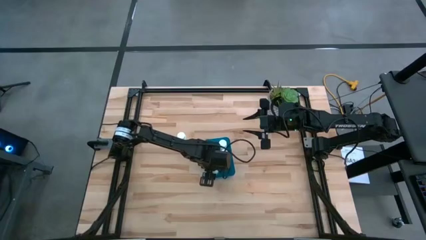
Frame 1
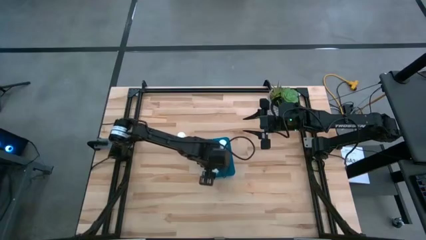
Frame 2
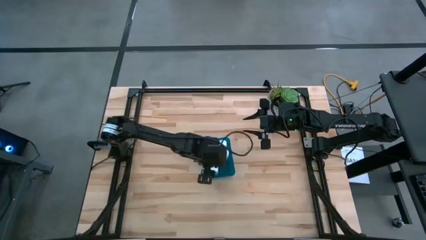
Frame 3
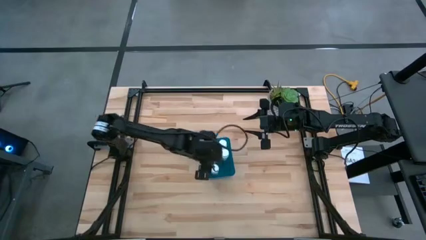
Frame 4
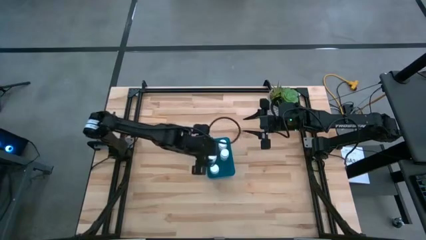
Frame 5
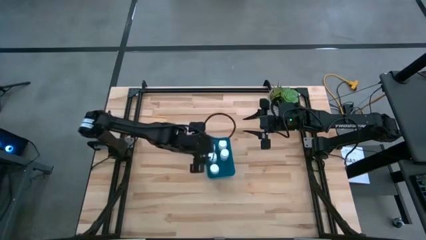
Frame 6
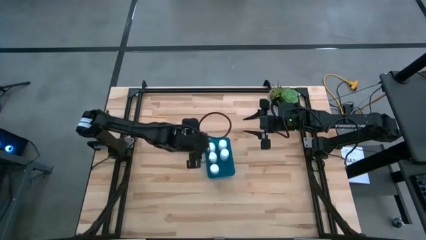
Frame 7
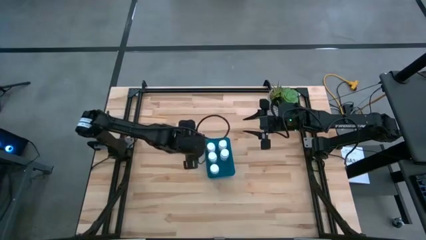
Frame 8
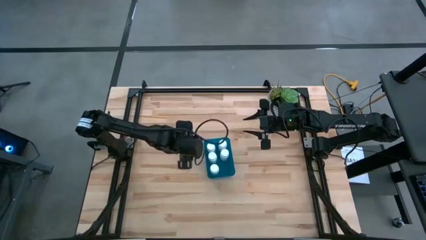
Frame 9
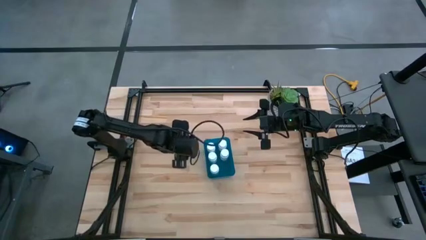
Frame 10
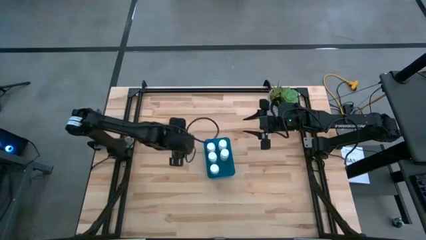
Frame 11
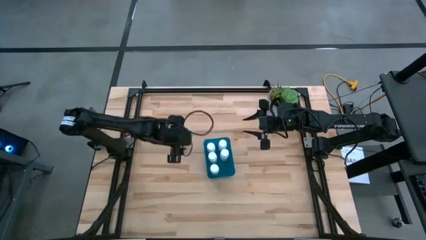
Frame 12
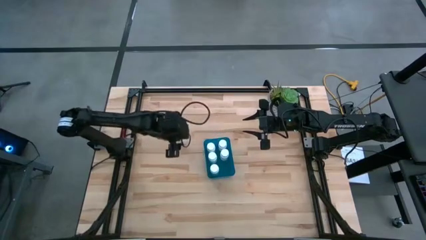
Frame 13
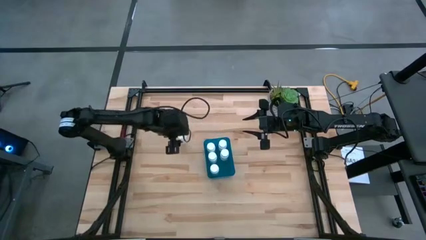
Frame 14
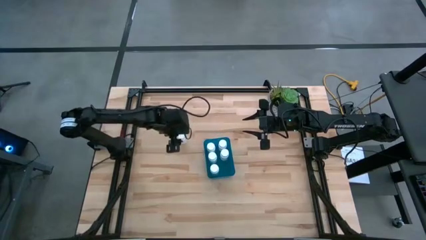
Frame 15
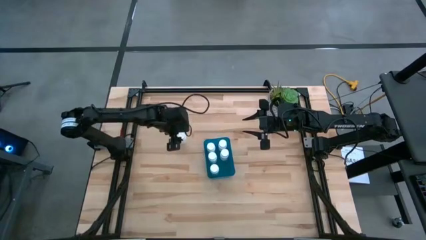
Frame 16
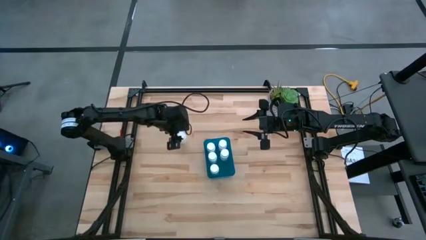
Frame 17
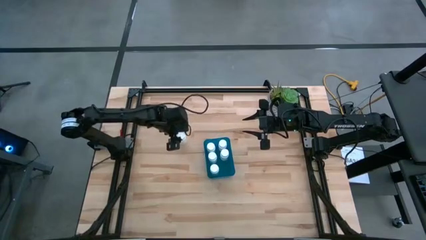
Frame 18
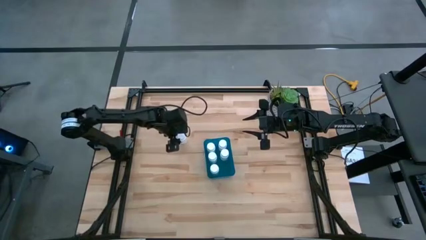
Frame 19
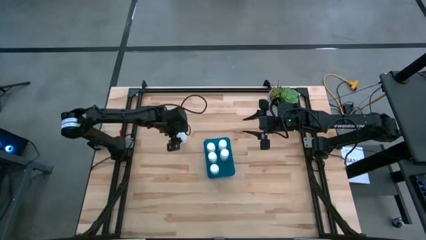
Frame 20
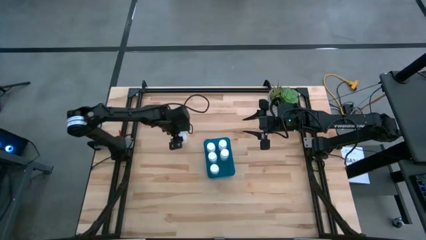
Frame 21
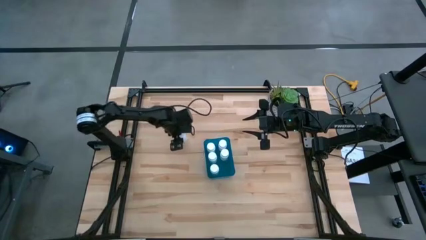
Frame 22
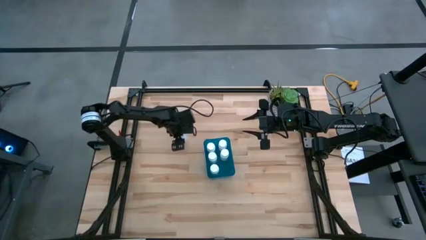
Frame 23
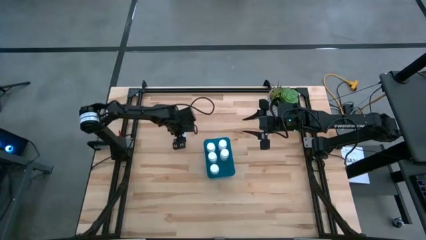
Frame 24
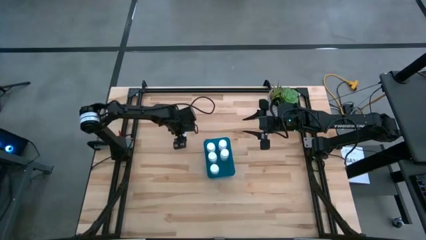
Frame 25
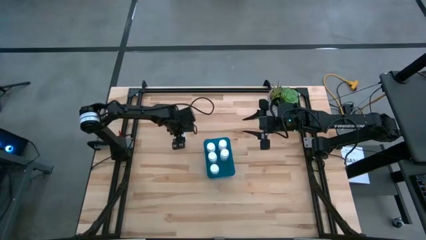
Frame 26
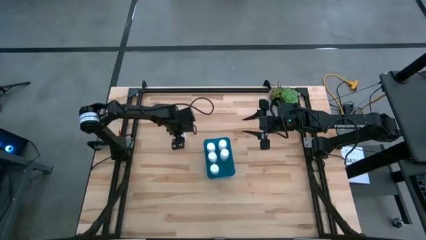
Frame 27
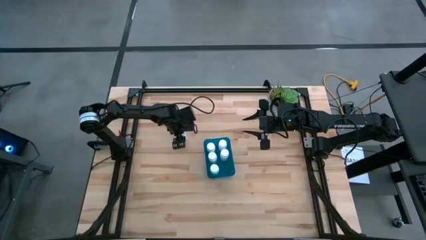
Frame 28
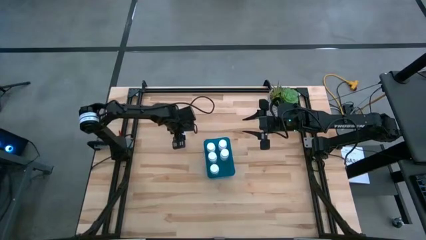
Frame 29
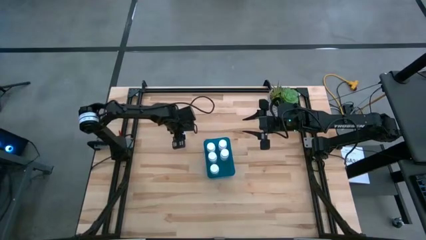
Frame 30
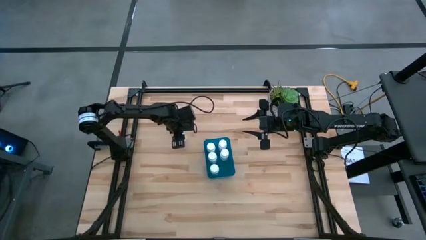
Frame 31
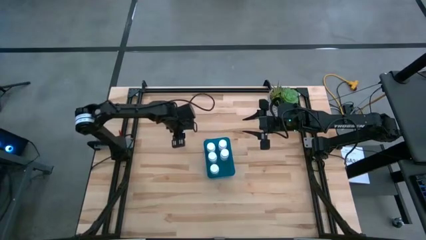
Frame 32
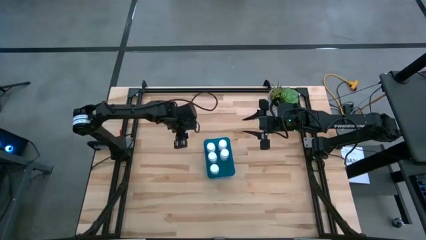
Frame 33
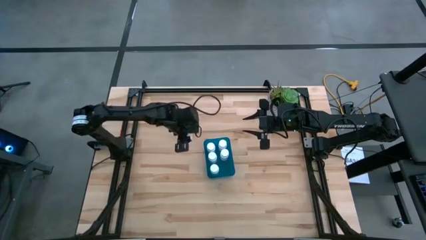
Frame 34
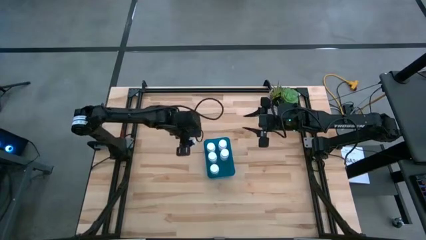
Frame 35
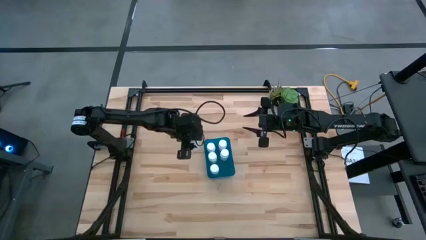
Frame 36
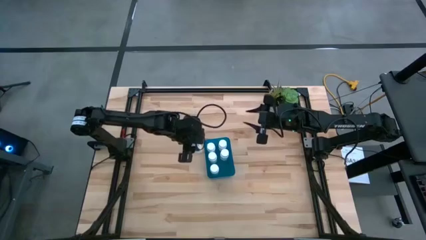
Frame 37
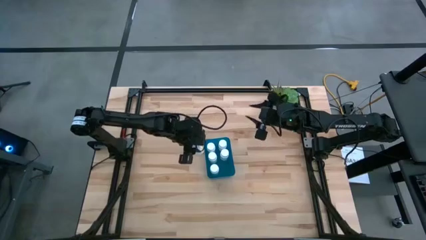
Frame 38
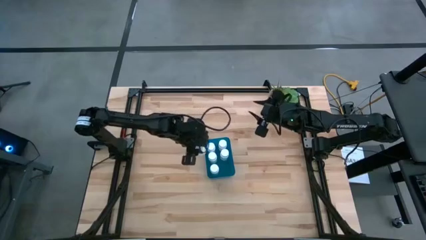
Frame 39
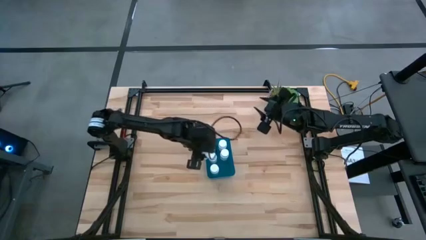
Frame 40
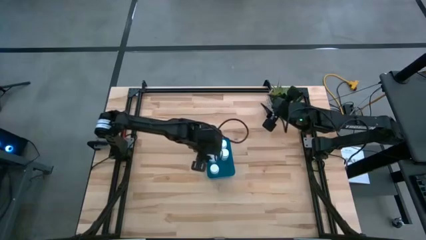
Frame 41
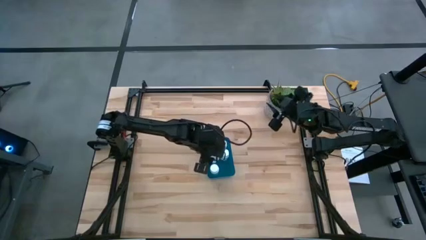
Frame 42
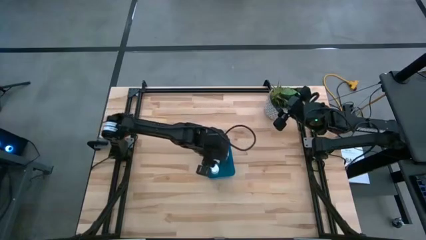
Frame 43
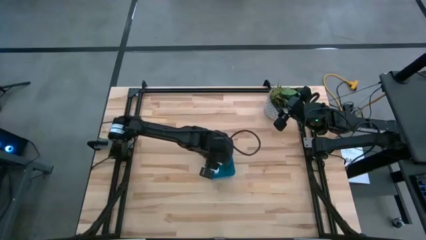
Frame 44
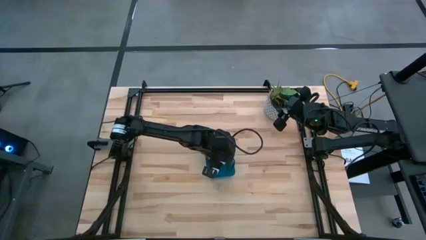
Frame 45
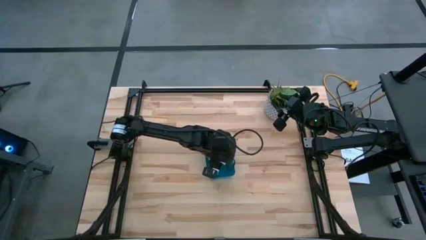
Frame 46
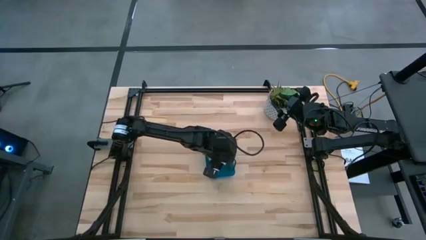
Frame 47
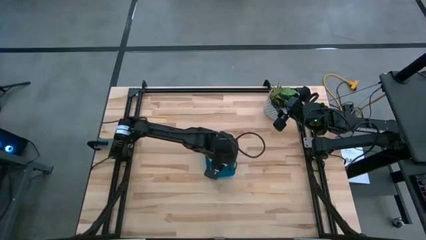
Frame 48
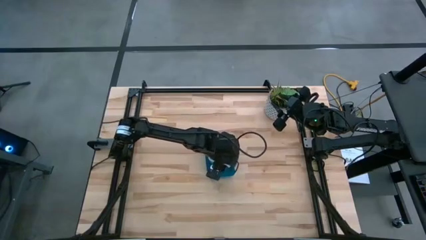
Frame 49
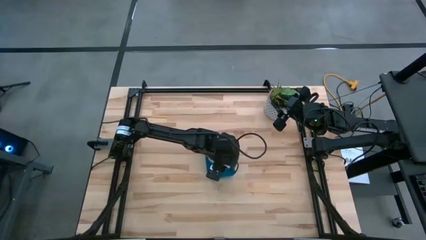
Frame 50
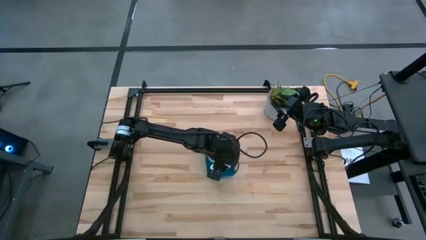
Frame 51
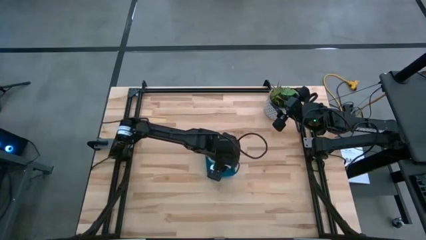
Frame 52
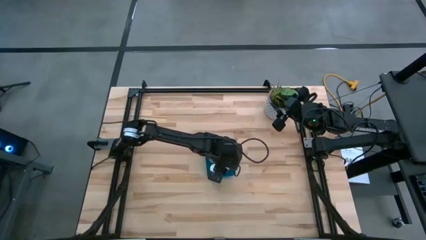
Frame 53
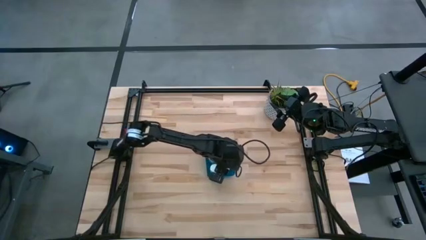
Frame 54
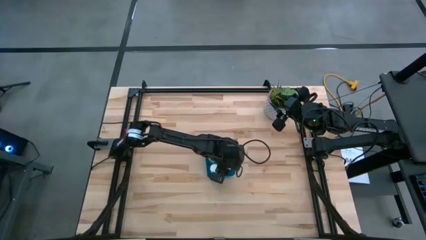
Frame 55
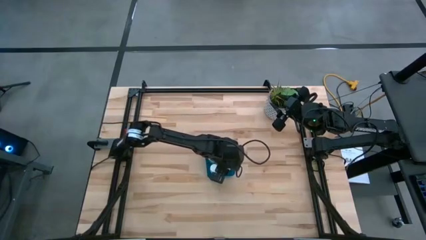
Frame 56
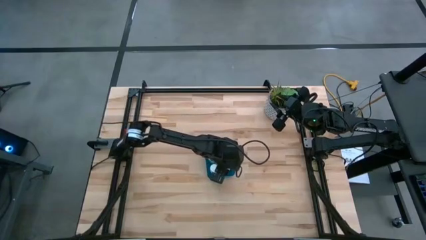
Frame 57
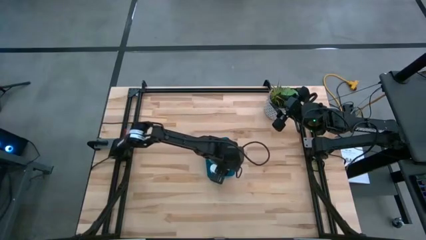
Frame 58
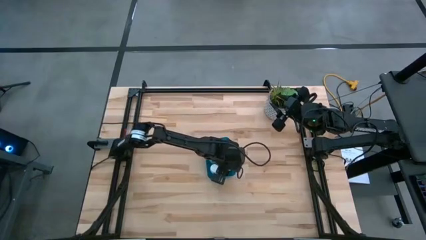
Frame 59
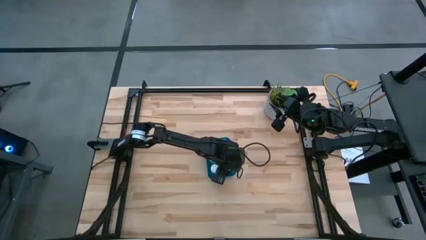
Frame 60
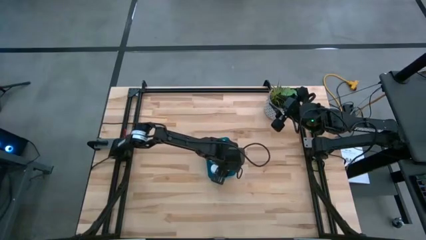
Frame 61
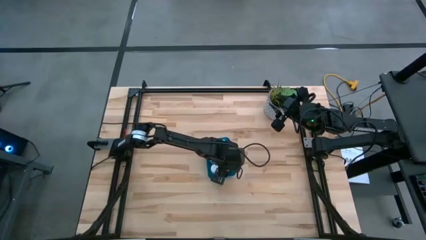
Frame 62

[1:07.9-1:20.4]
Task: Pick and place pill bottles into a basket
Put the white pill bottle into the blue bin
